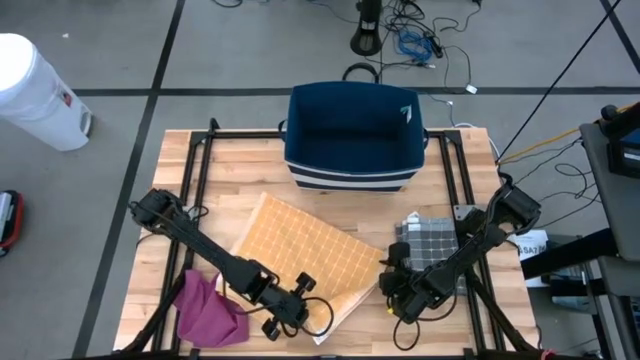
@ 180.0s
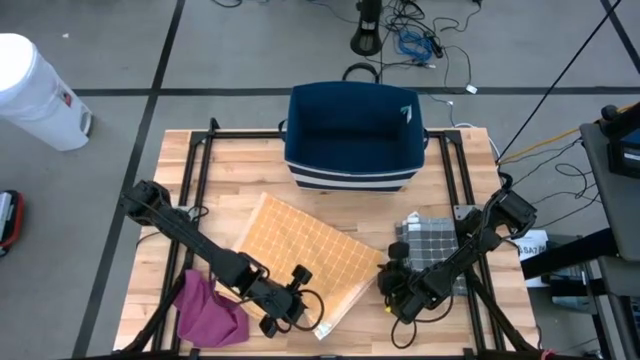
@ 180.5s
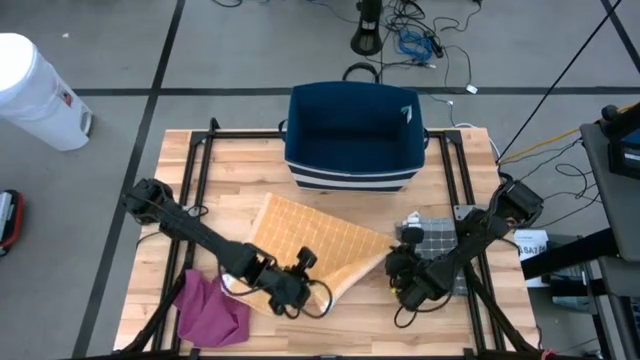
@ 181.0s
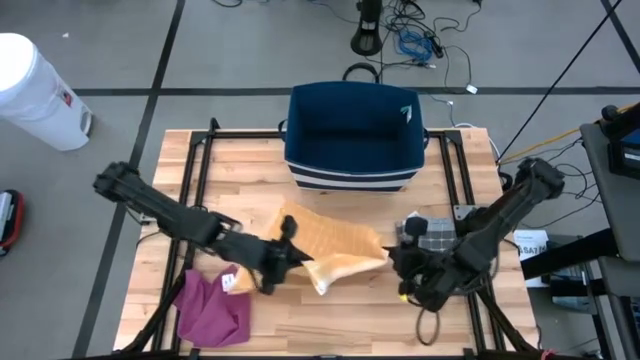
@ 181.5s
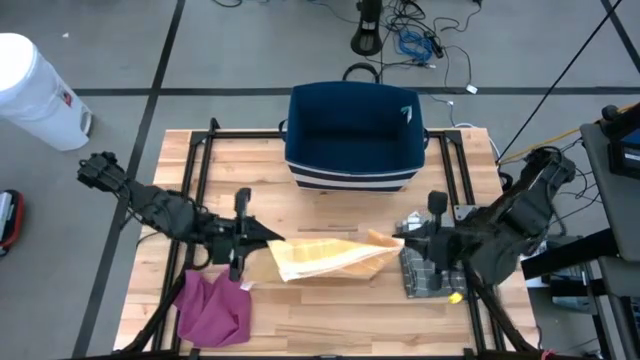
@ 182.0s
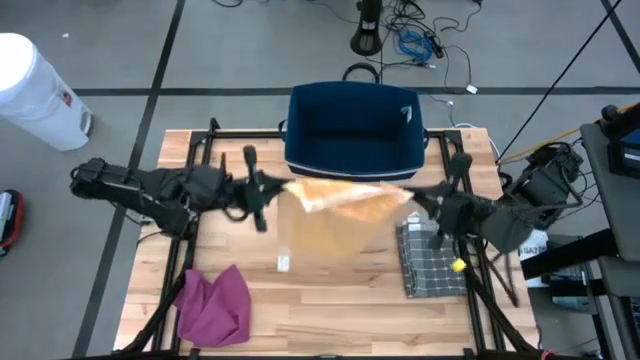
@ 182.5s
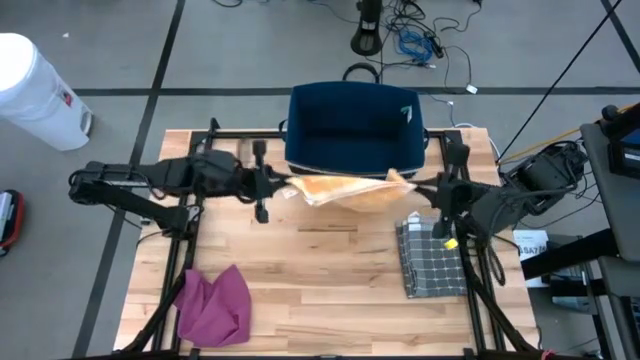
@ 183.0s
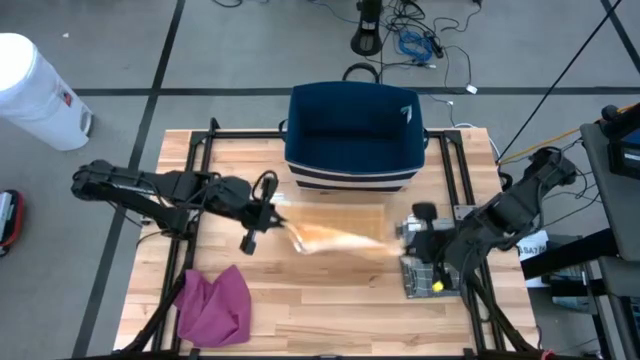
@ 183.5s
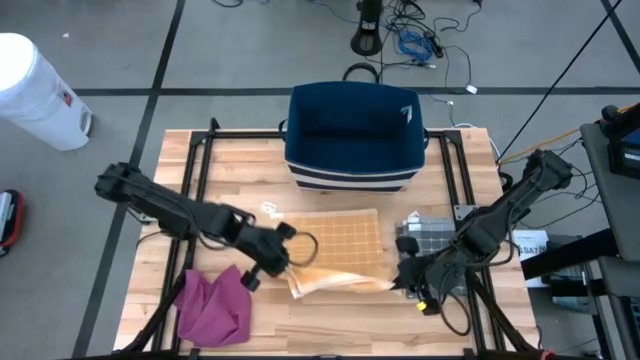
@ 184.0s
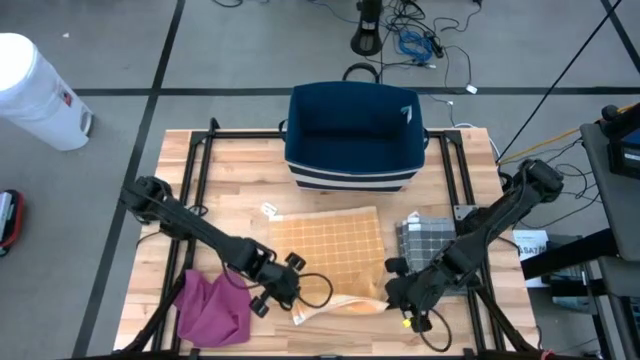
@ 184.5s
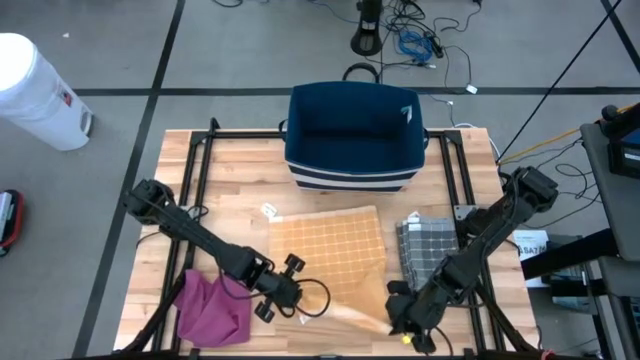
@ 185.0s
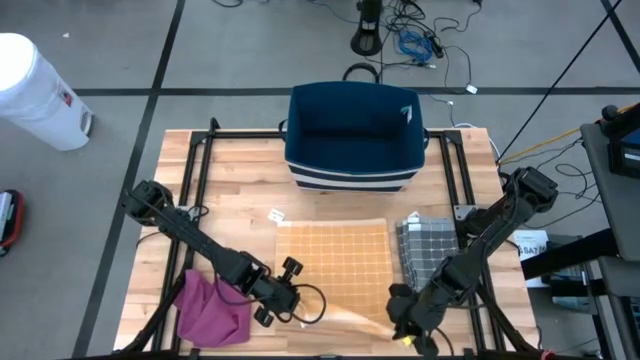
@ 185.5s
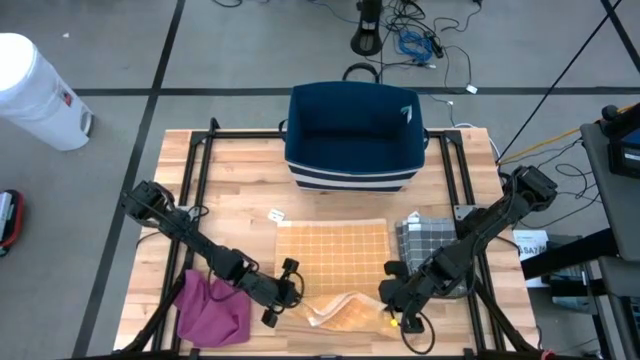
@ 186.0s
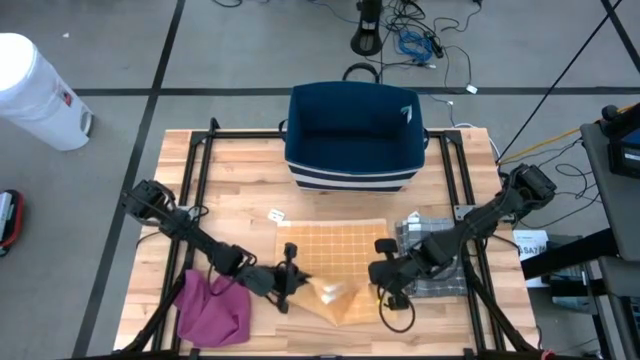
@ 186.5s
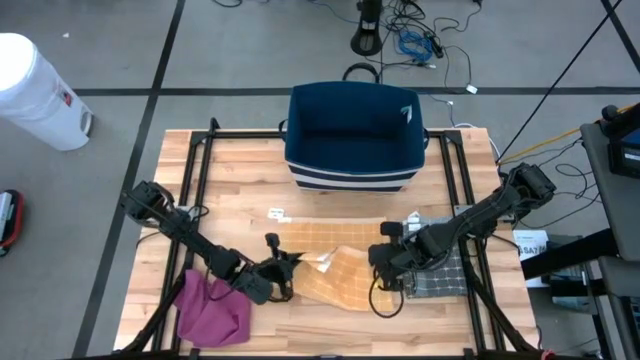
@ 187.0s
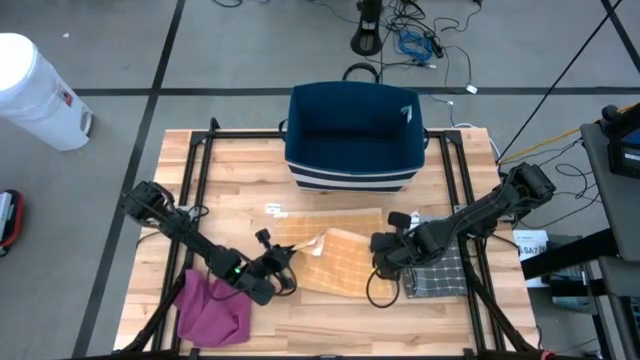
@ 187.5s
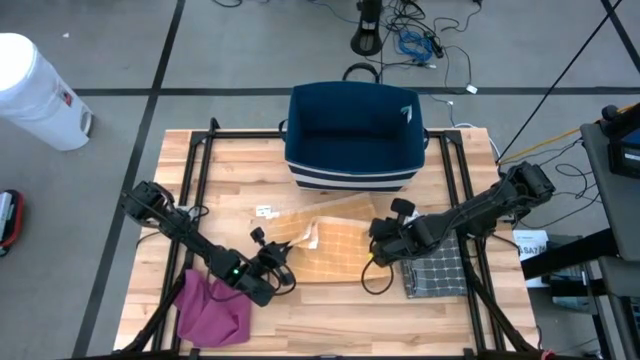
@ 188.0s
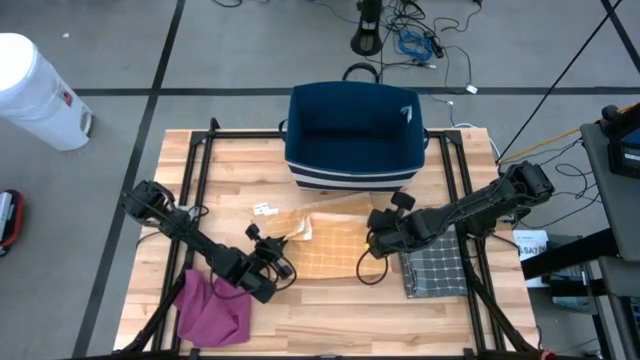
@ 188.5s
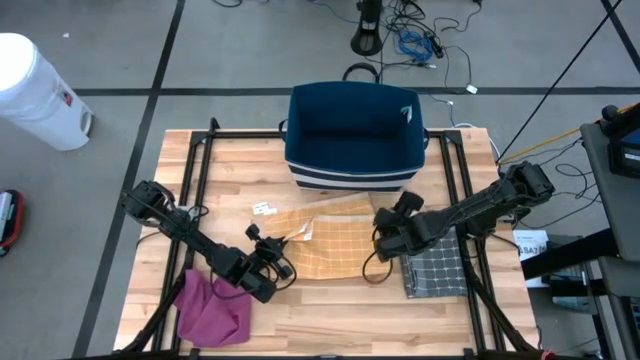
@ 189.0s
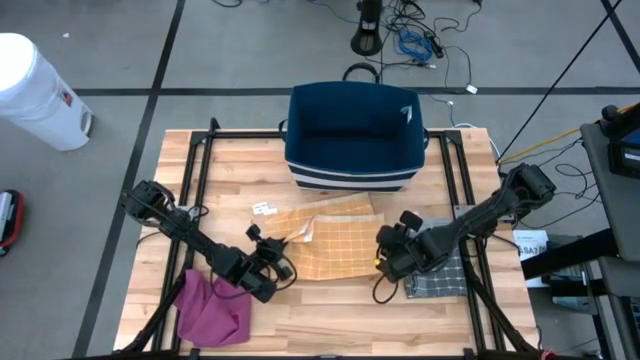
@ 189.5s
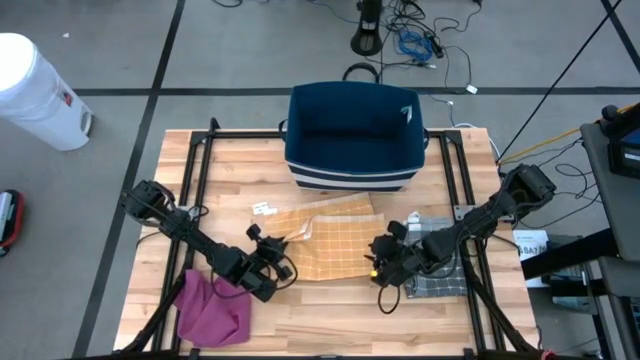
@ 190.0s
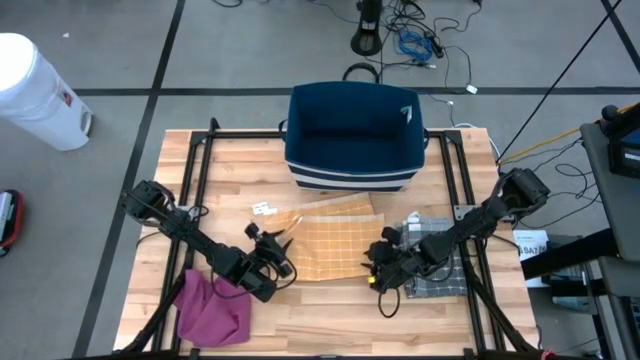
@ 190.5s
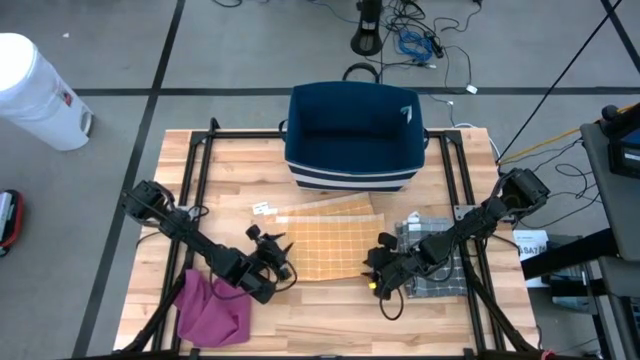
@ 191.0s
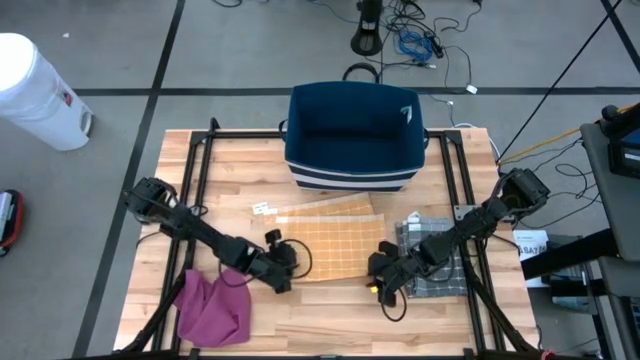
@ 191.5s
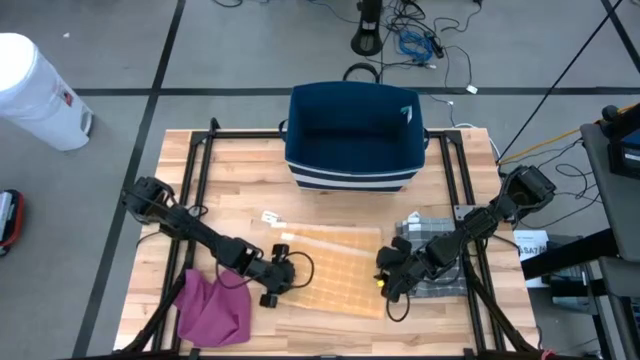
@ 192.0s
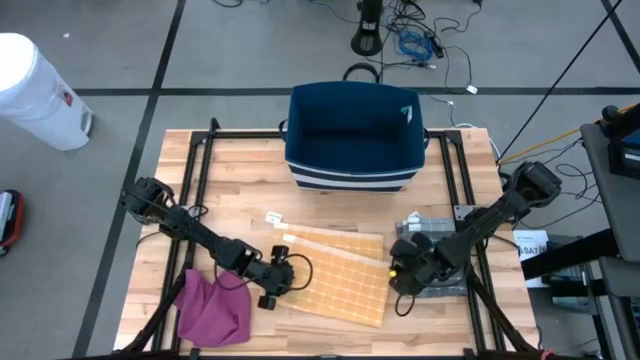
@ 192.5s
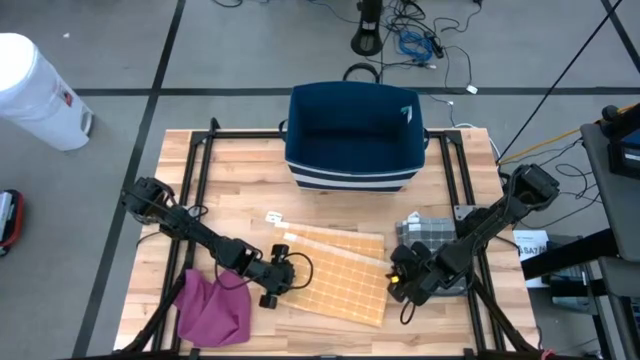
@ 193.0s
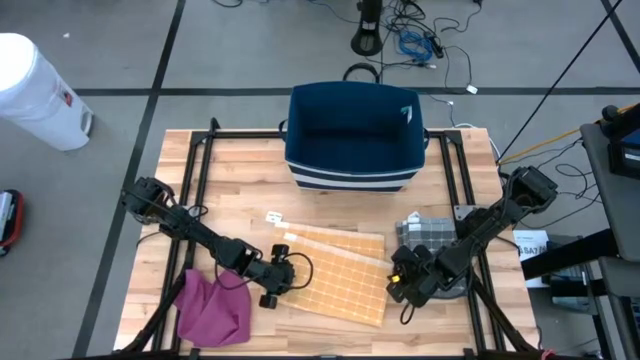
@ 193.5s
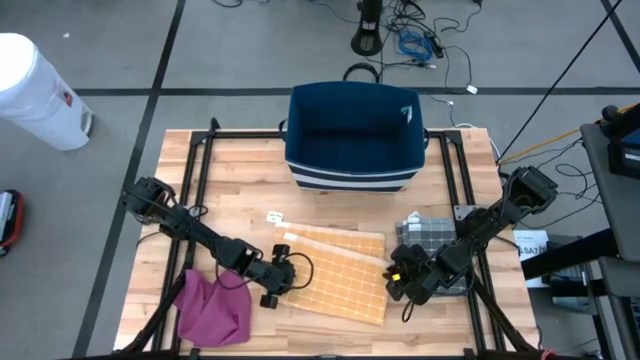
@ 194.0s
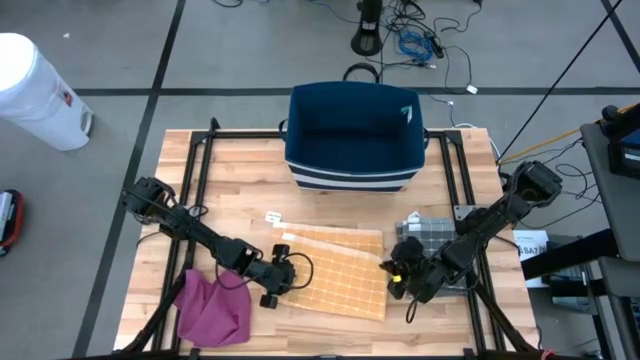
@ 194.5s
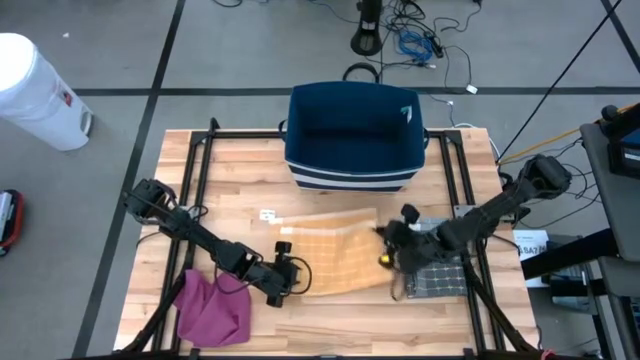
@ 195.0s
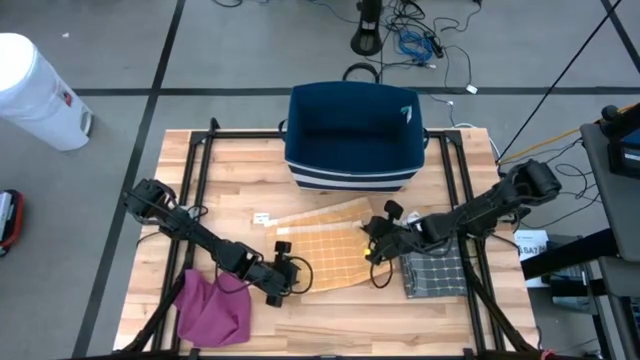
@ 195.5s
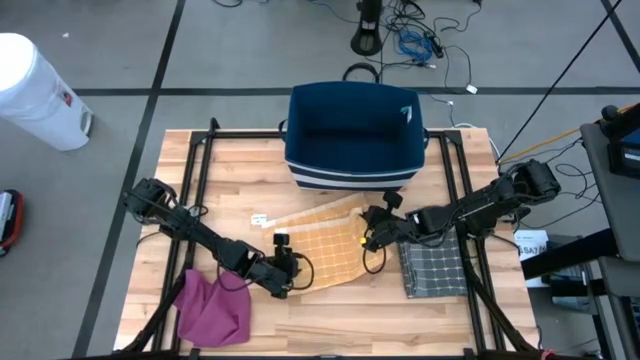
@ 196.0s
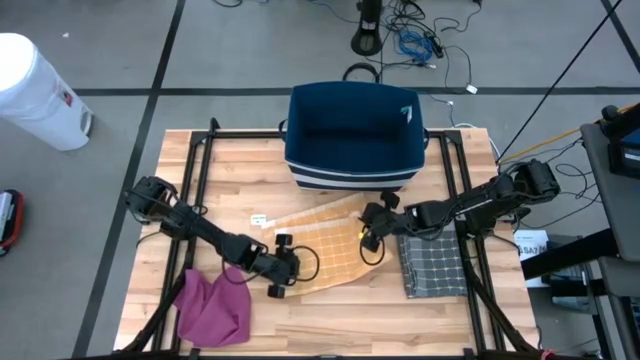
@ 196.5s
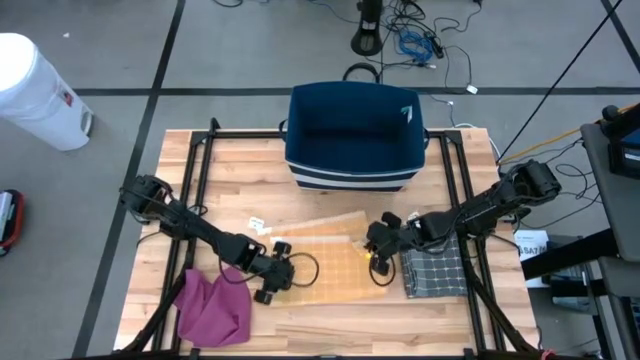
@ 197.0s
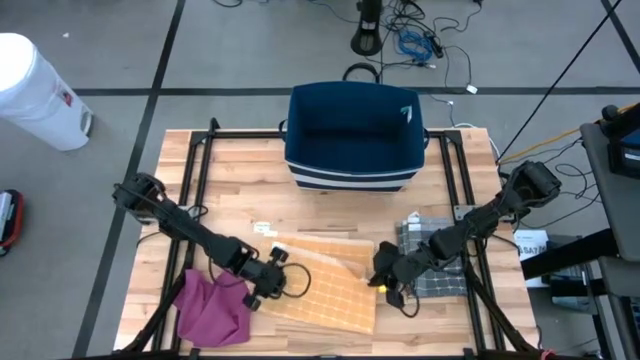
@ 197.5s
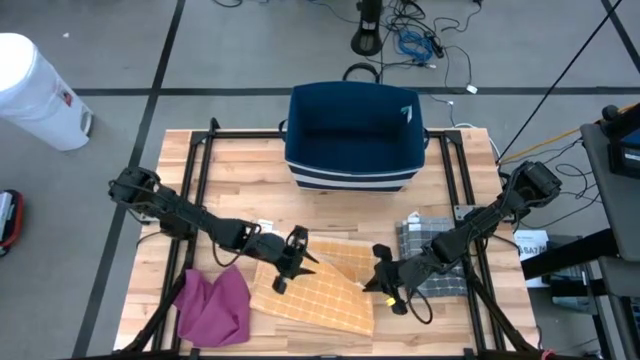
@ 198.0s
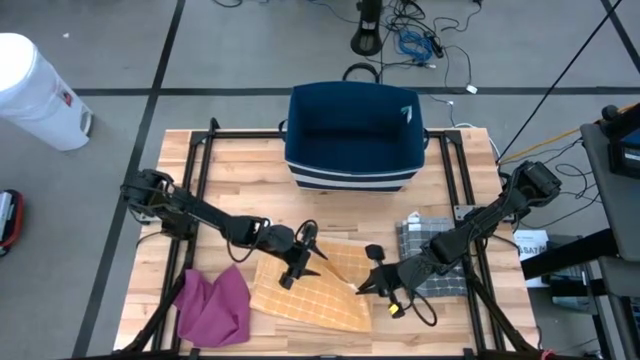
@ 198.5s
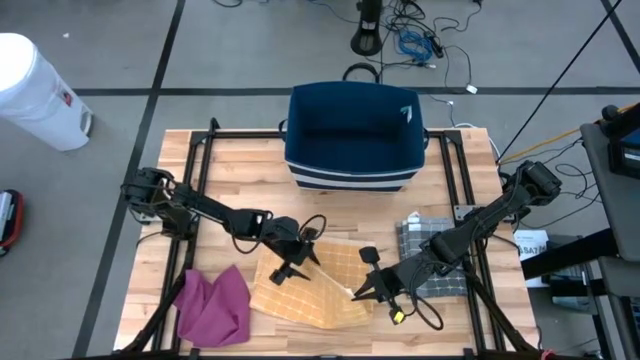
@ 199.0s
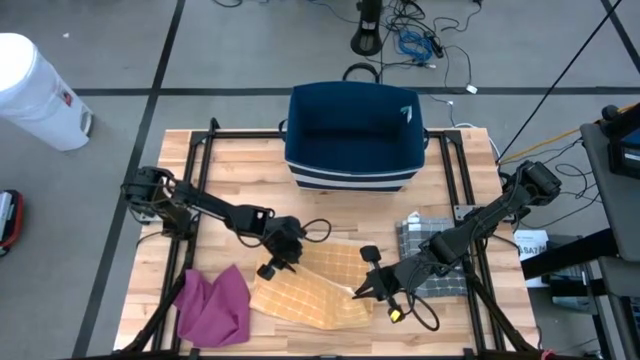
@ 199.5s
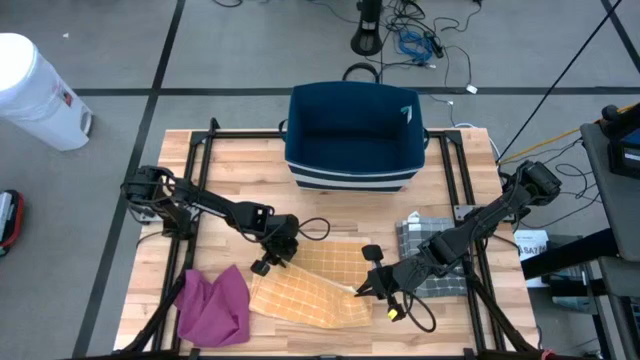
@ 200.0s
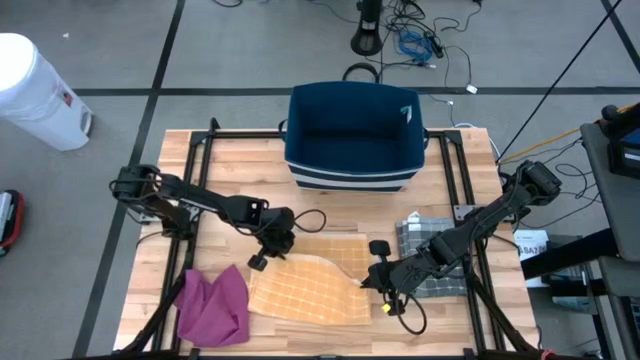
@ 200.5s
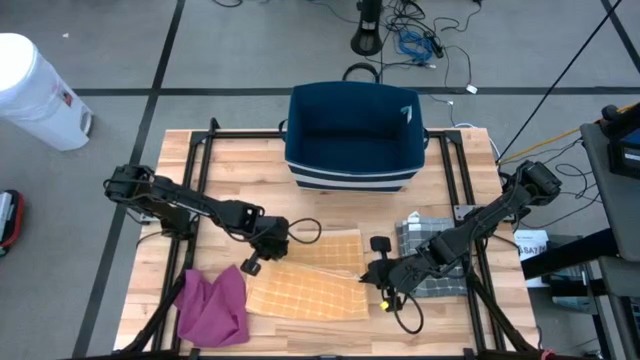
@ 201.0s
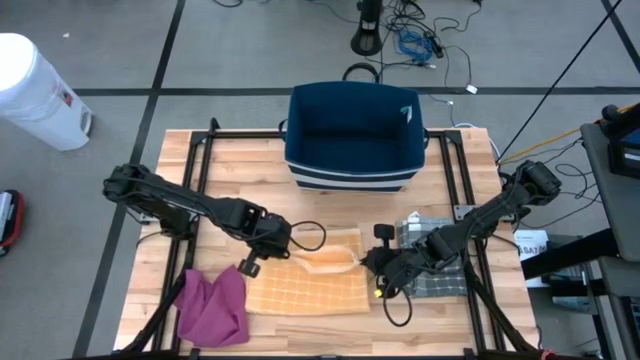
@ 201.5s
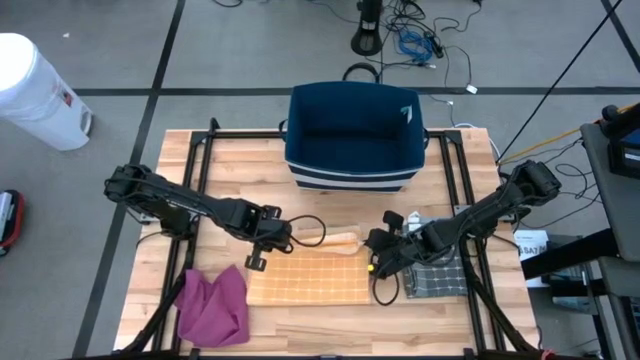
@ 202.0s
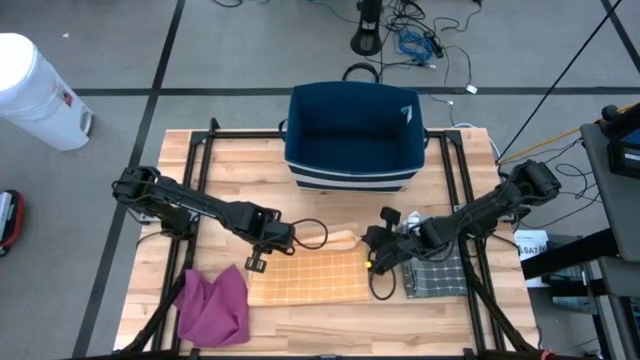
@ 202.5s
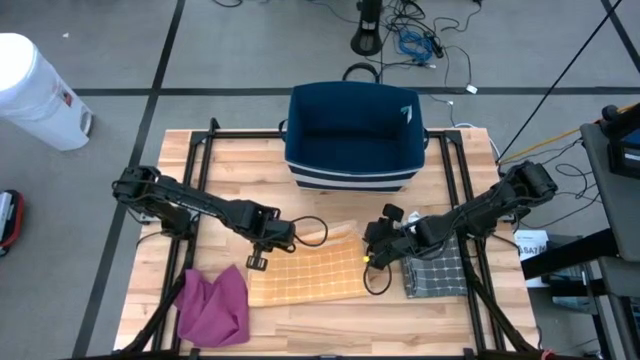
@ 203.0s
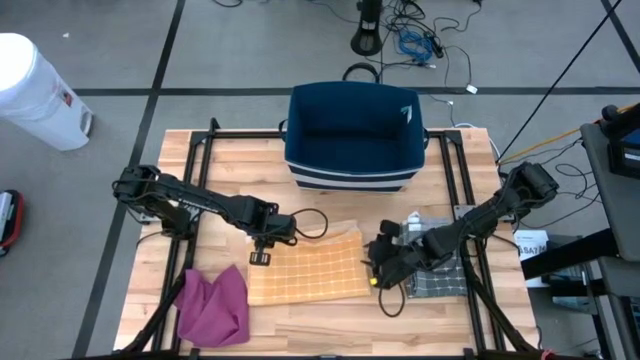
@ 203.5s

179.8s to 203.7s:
Task: Fold towel
Fold the orange patterned towel
